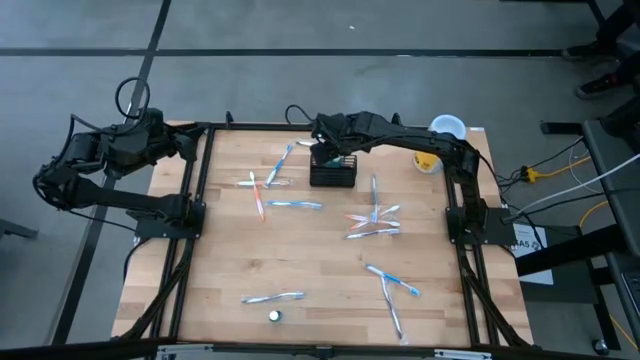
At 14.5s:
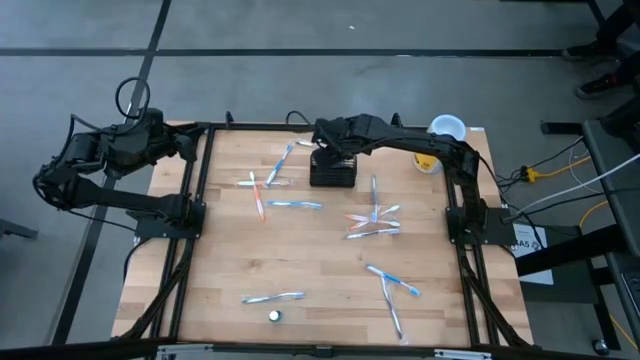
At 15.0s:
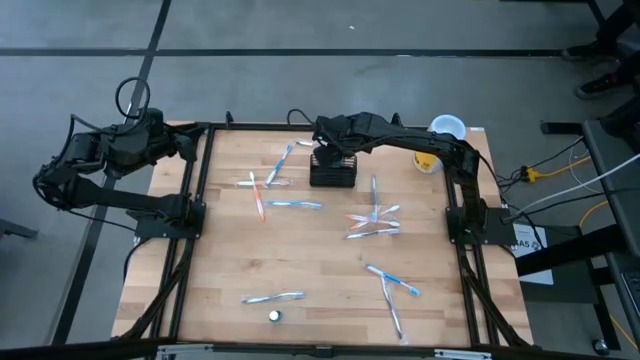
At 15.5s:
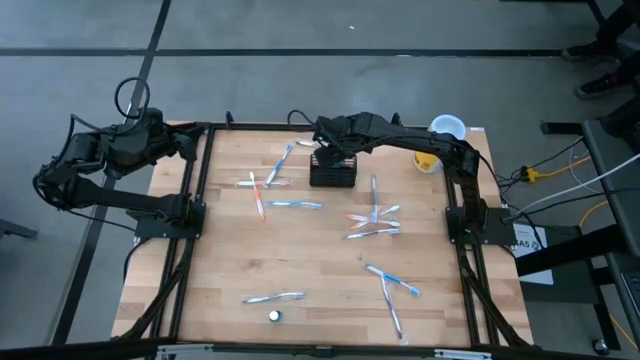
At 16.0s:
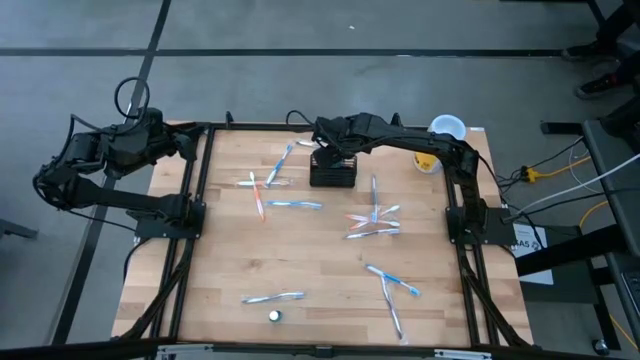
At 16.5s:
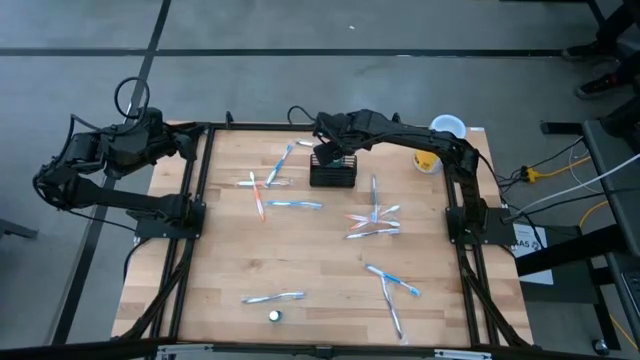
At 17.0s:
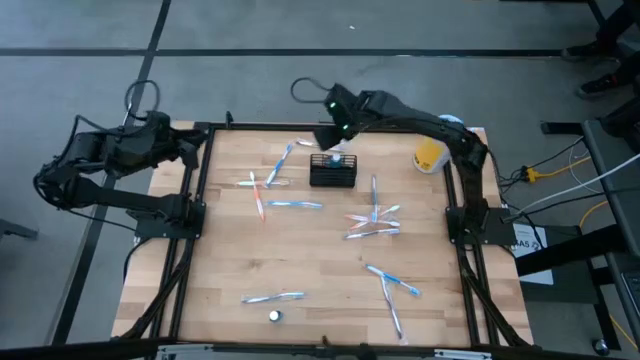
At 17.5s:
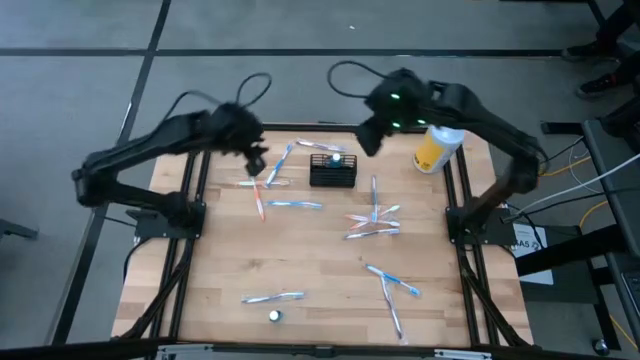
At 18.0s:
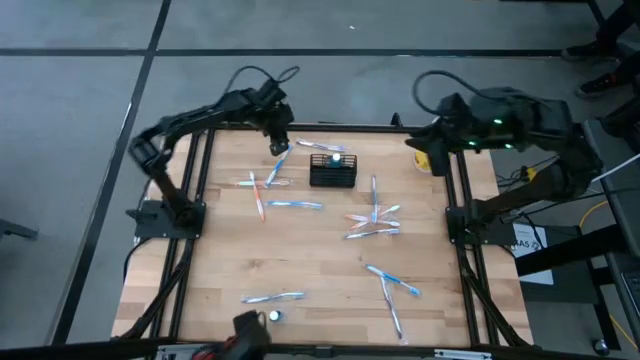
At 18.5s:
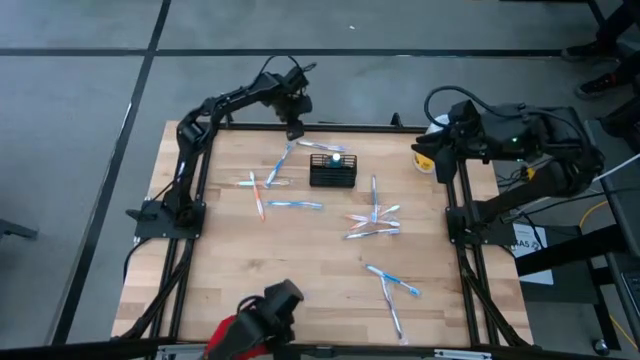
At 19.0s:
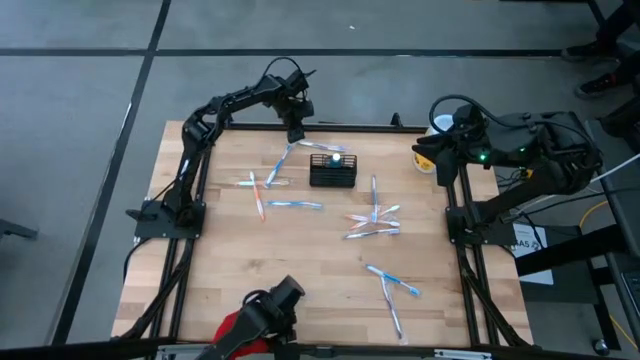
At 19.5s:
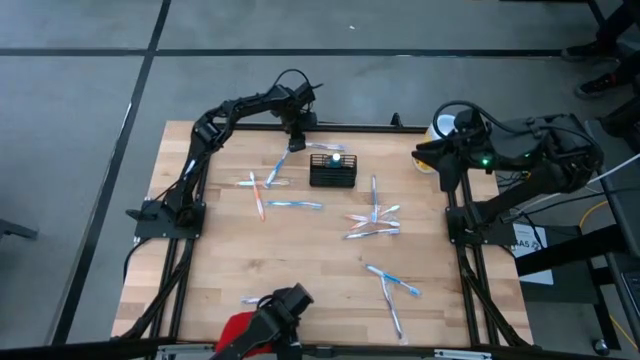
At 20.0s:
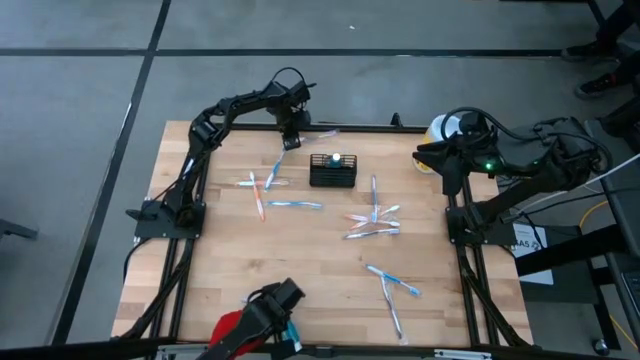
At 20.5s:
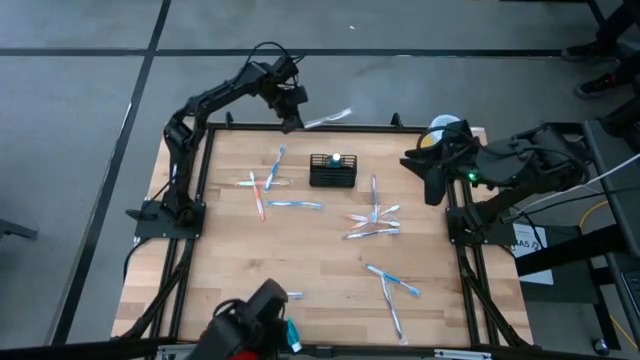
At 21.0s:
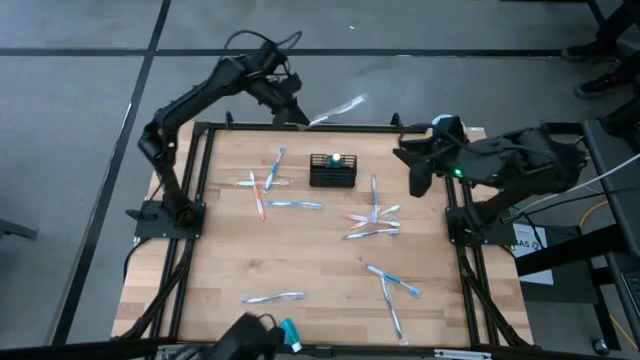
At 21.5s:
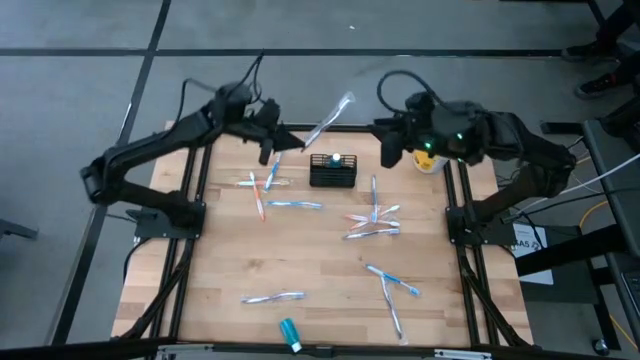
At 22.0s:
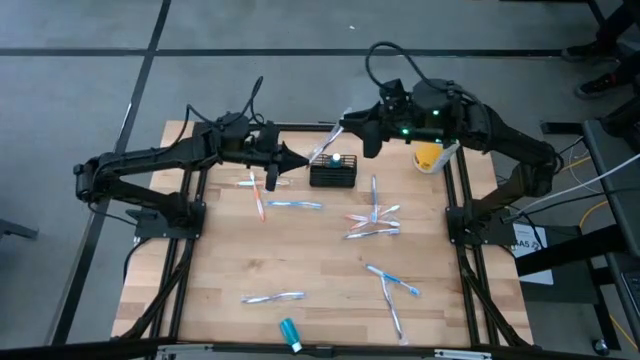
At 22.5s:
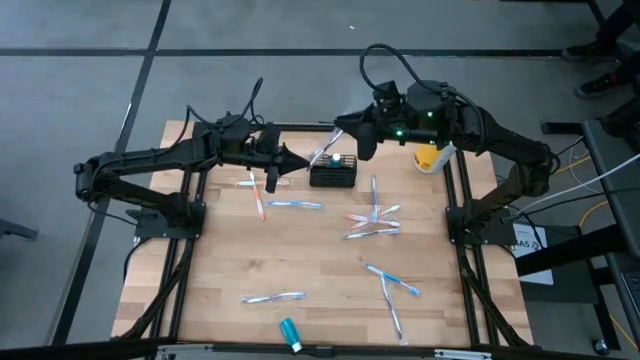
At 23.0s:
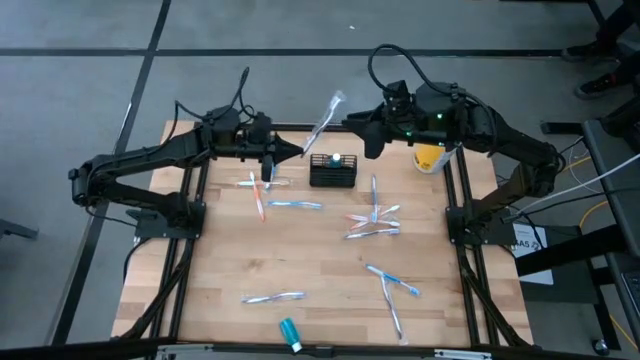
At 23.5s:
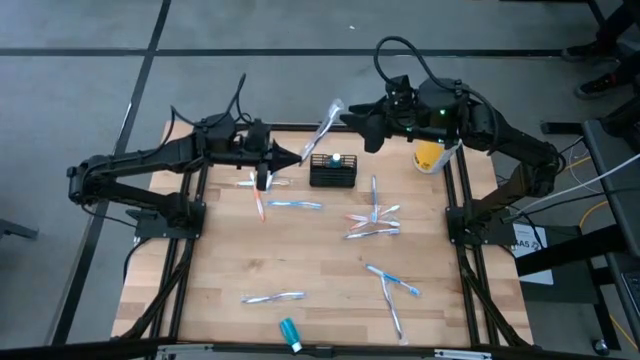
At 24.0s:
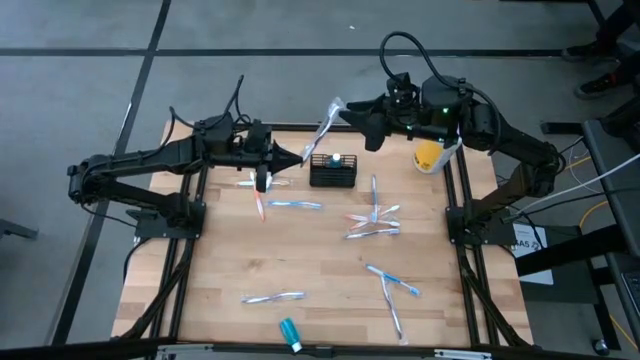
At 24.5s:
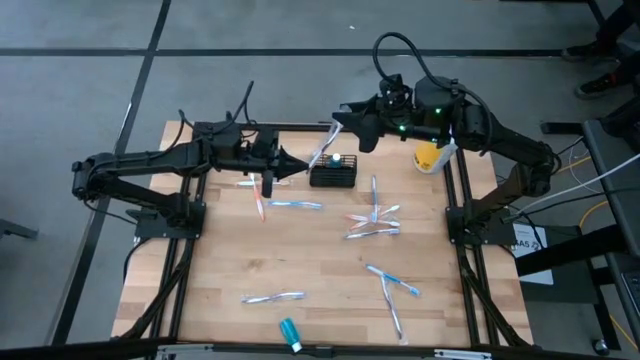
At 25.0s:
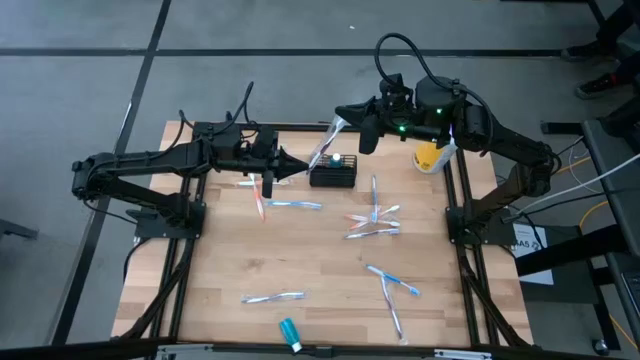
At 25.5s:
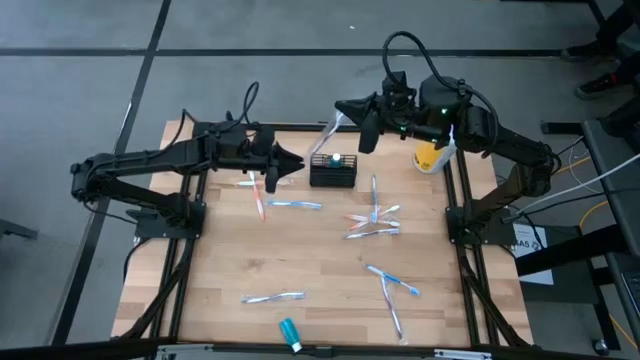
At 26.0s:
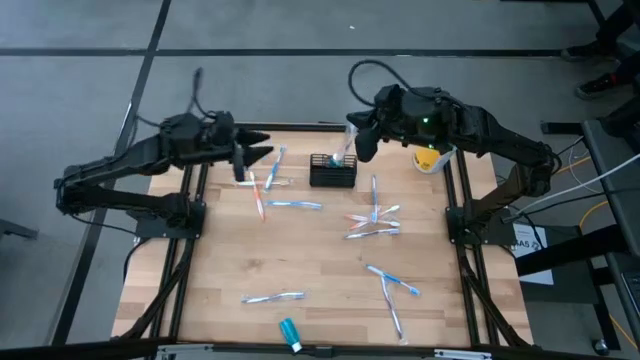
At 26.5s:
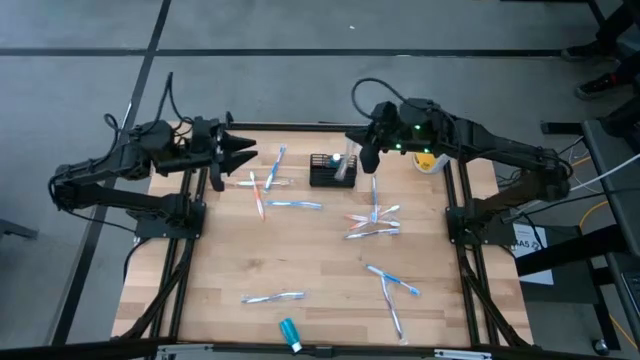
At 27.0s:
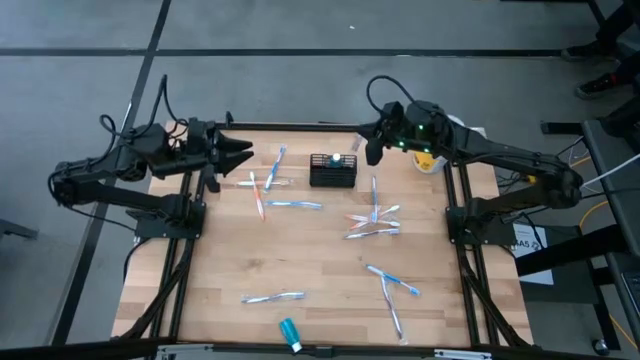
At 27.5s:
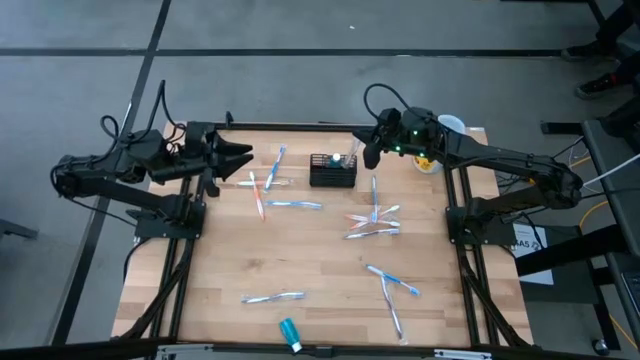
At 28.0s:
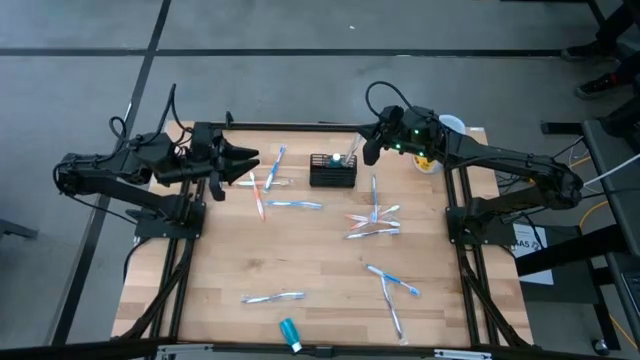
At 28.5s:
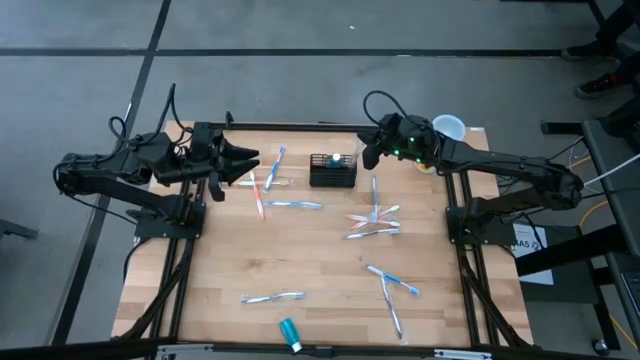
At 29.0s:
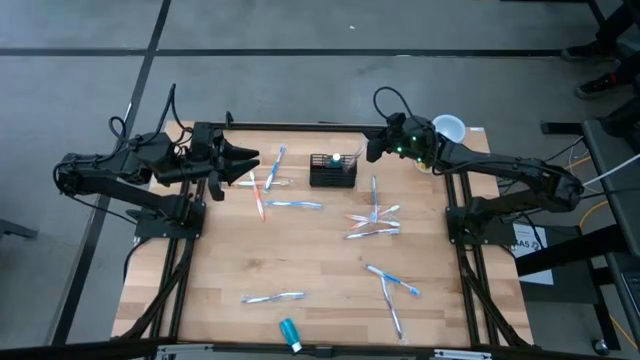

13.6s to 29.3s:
Task: Pick & Place toothbrushing station
Put the purple toothbrush into the black mesh organizer

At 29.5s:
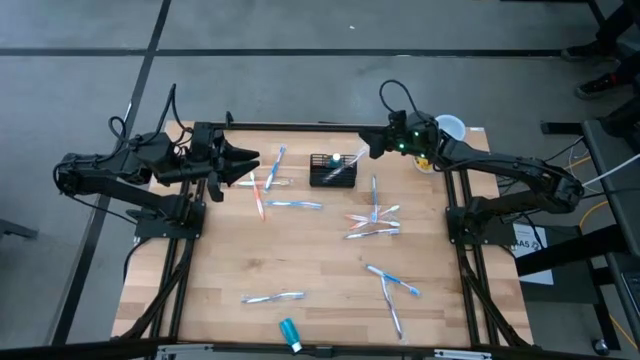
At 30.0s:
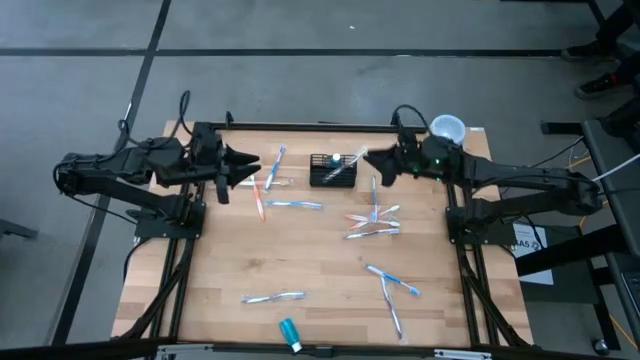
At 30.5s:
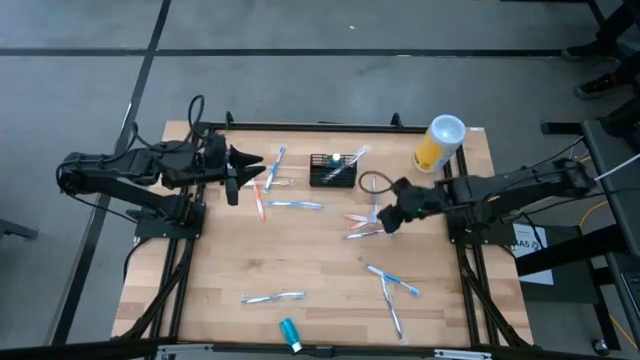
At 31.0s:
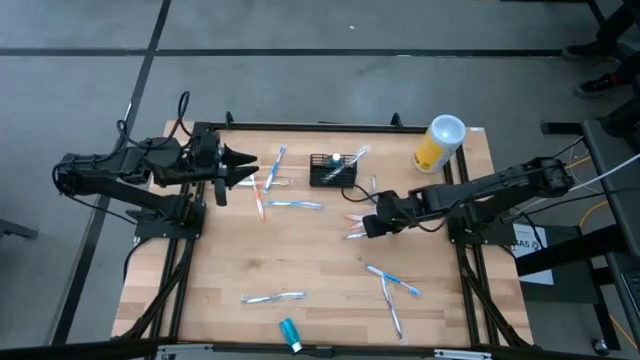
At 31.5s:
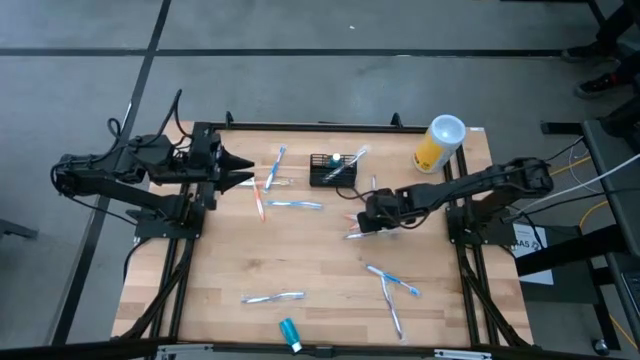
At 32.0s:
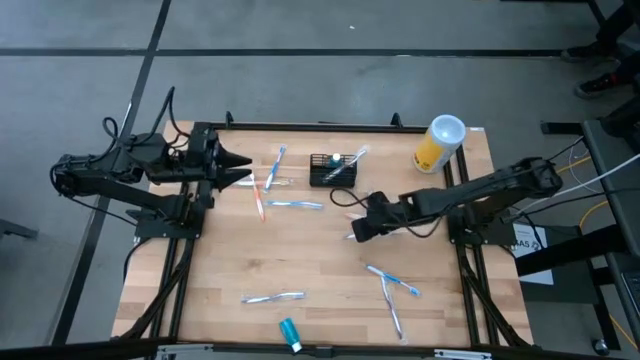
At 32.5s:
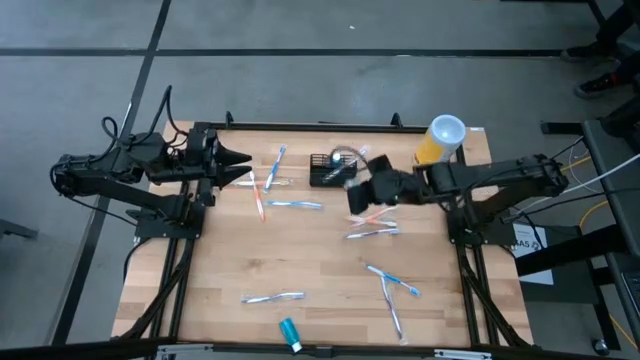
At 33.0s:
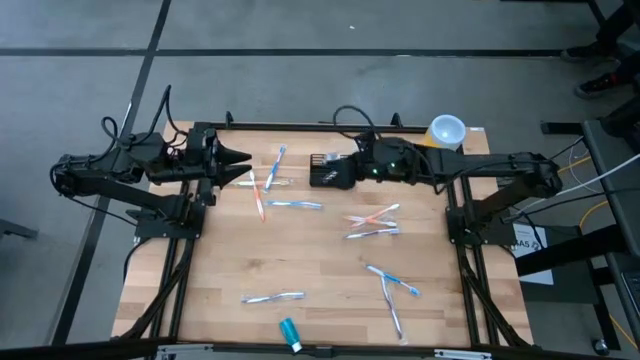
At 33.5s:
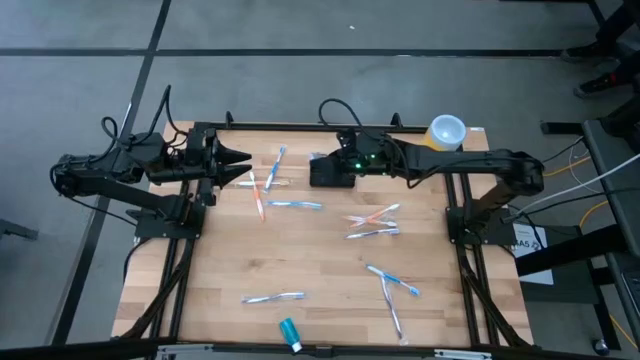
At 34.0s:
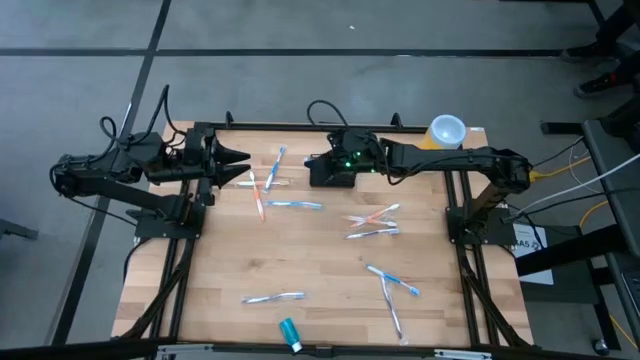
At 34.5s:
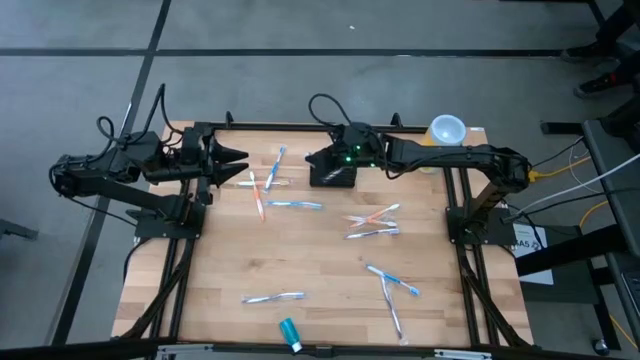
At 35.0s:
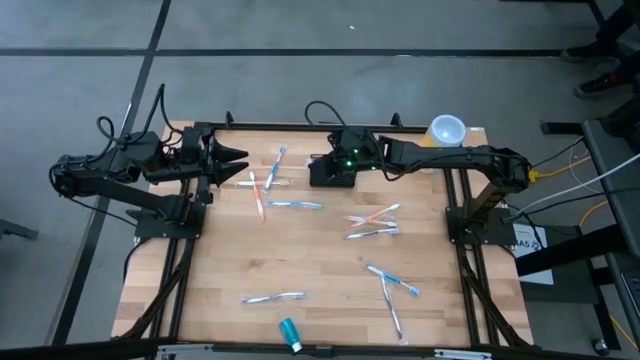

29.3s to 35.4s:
Put the blue toothbrush into the black mesh organizer
